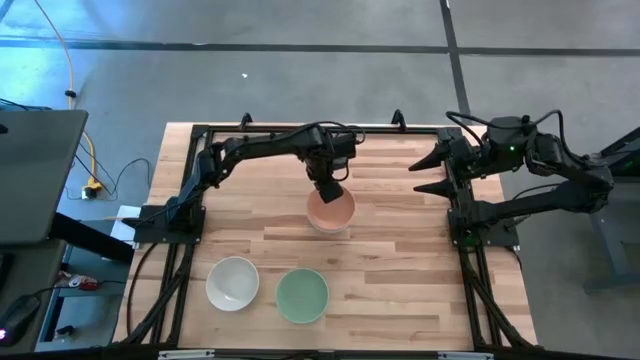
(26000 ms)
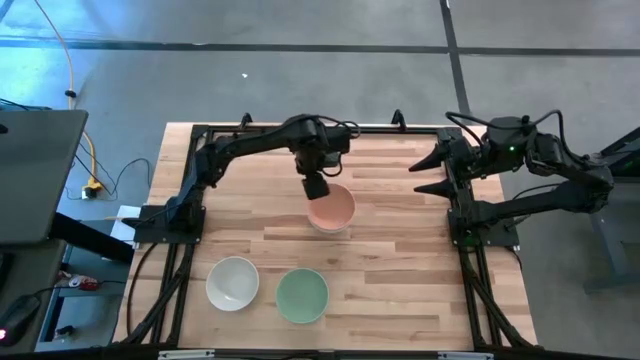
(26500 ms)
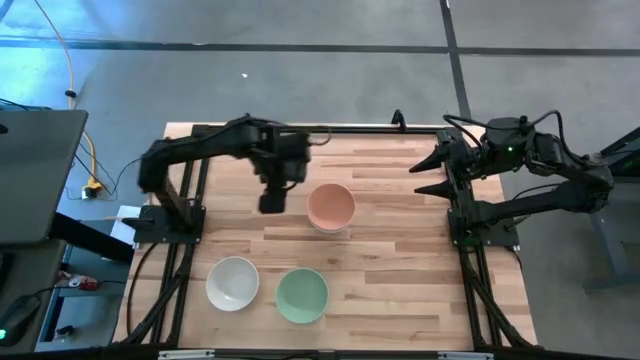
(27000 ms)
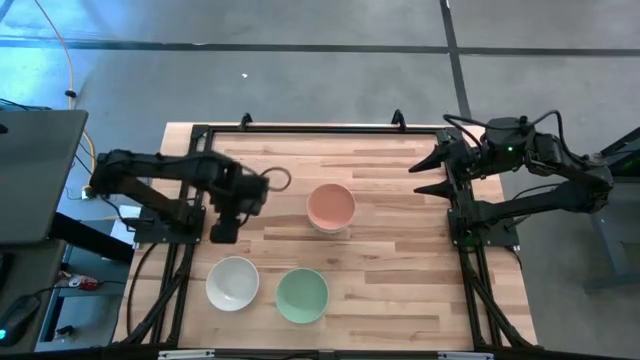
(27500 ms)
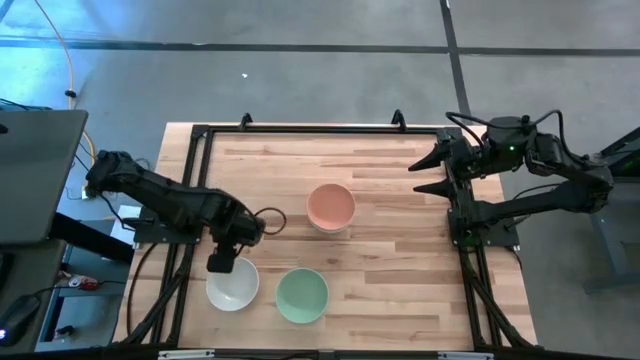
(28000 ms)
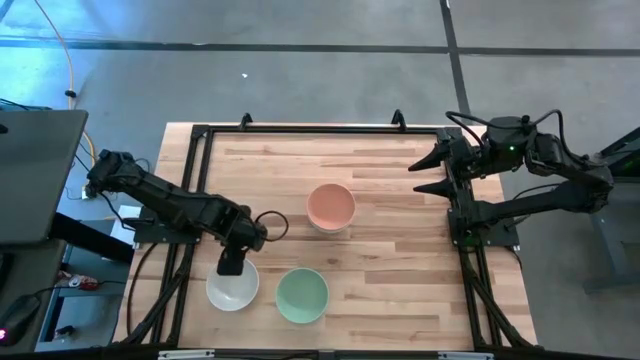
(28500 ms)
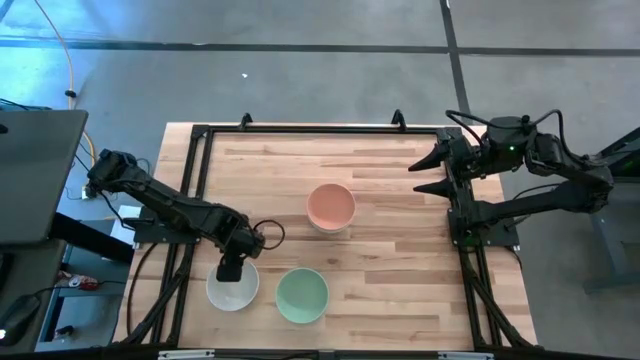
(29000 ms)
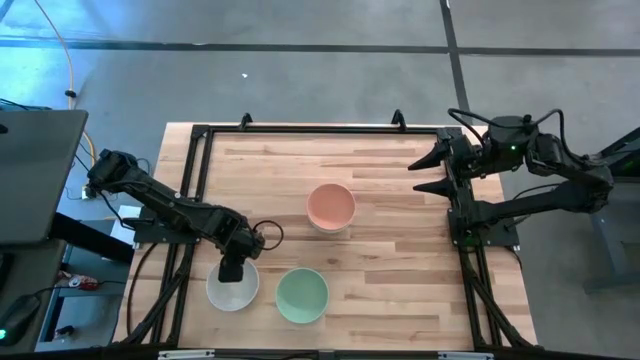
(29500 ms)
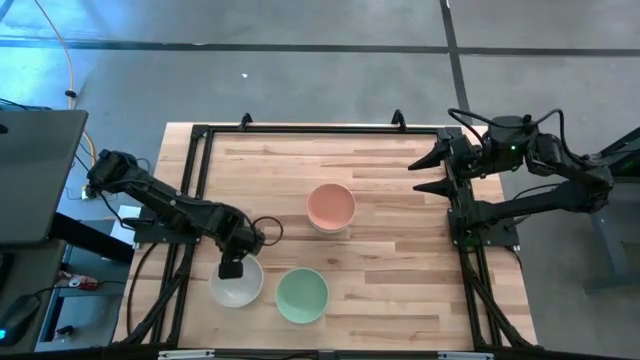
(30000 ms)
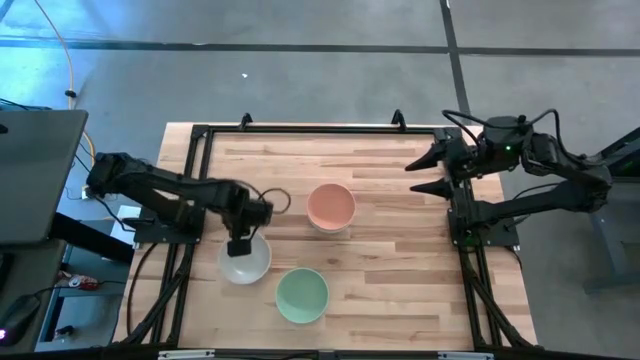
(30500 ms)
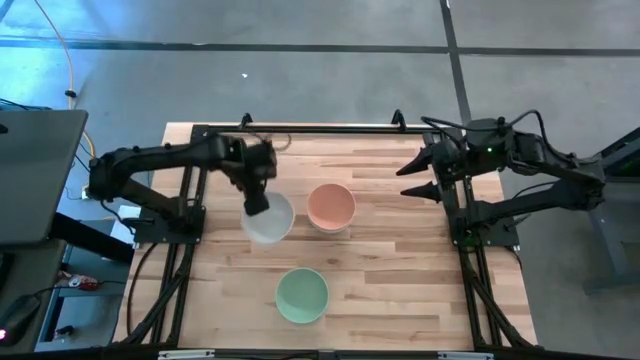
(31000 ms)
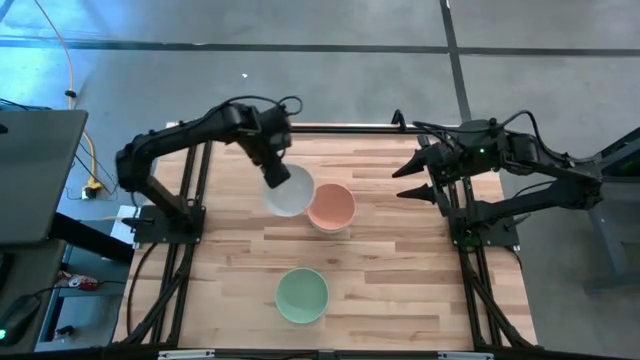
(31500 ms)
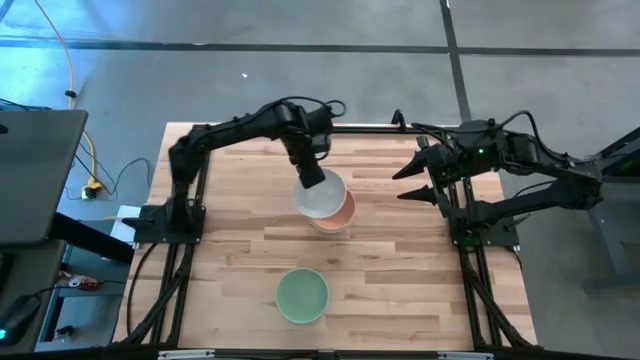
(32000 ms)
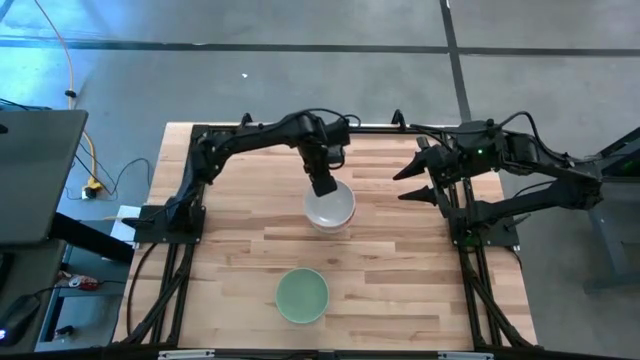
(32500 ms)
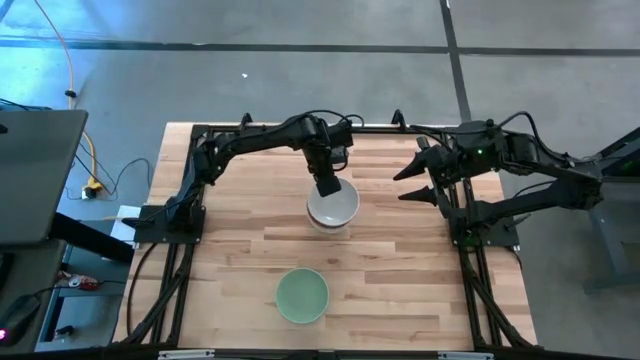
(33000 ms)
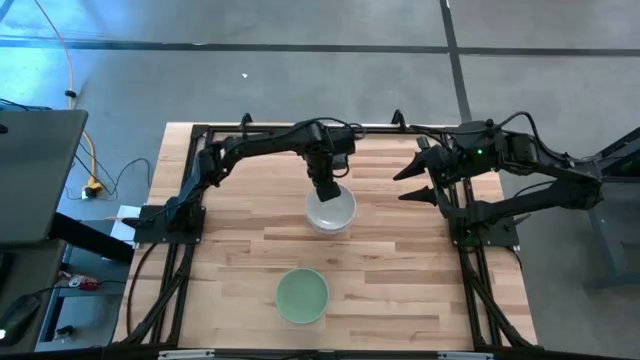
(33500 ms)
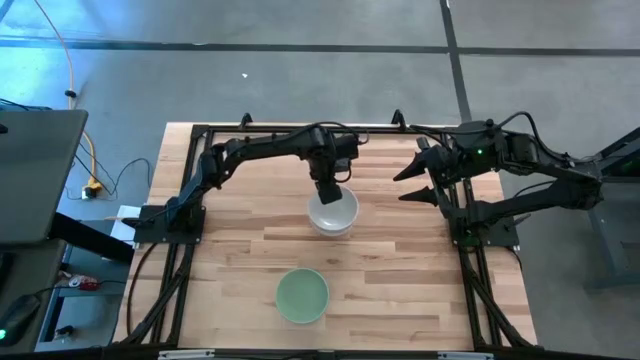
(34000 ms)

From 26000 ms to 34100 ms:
Task: Nest bowls inside each other
Stack the white bowl on top of the orange bowl

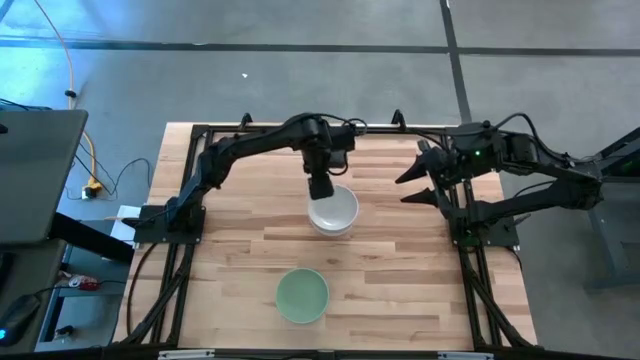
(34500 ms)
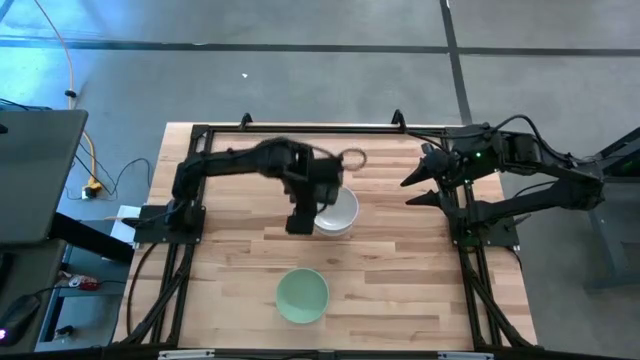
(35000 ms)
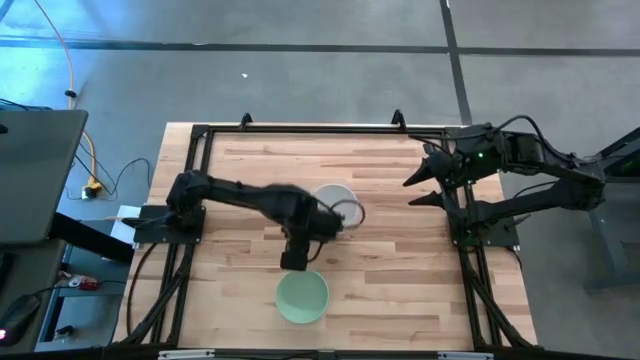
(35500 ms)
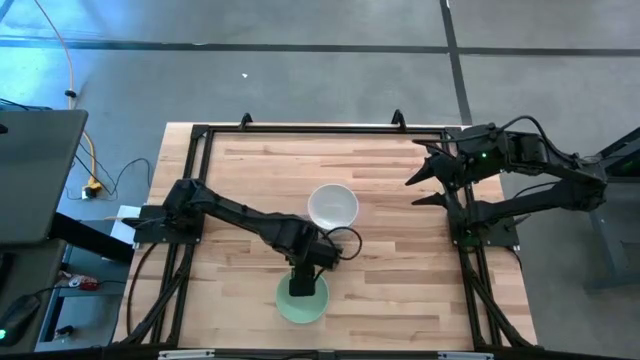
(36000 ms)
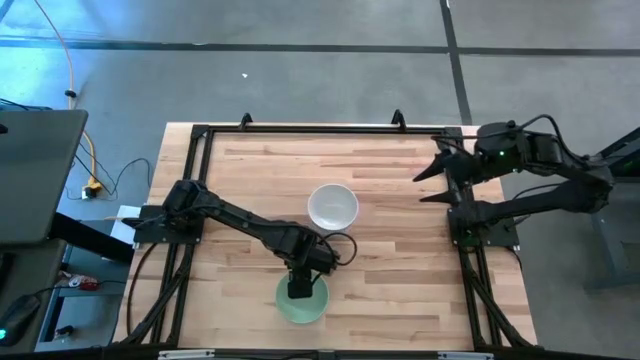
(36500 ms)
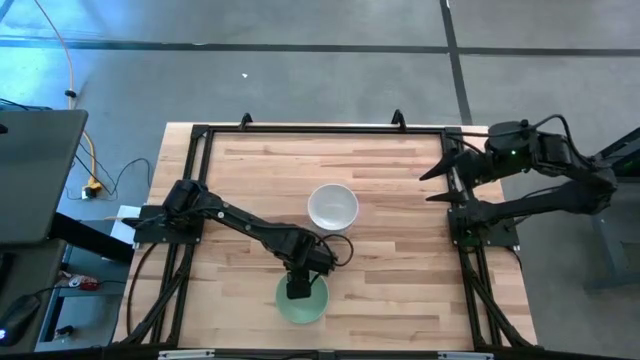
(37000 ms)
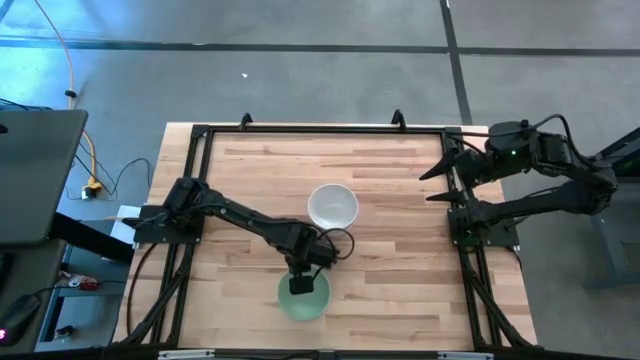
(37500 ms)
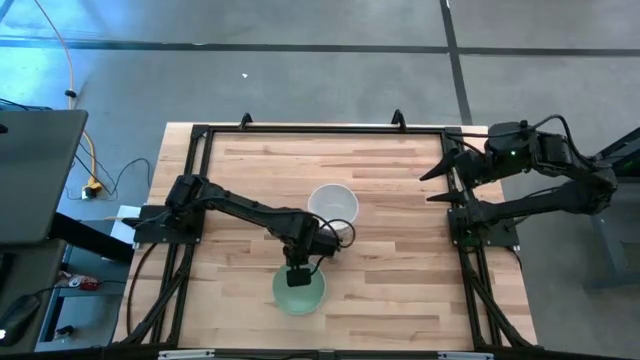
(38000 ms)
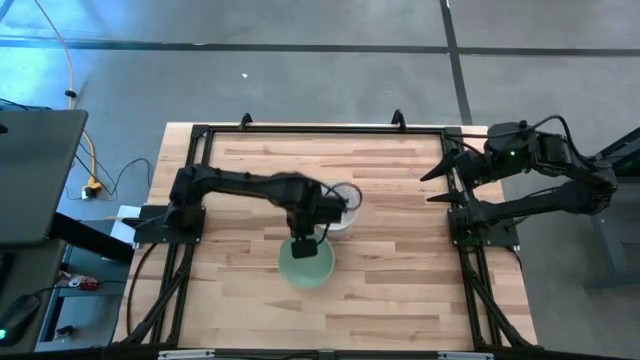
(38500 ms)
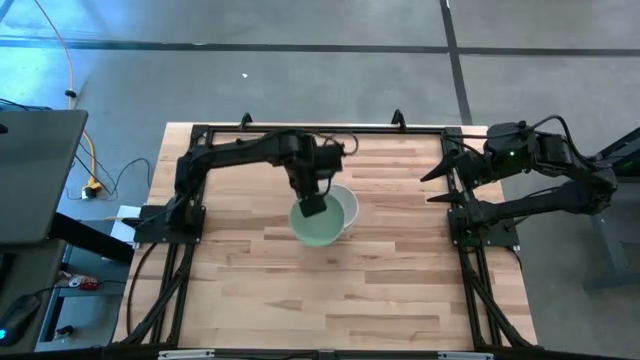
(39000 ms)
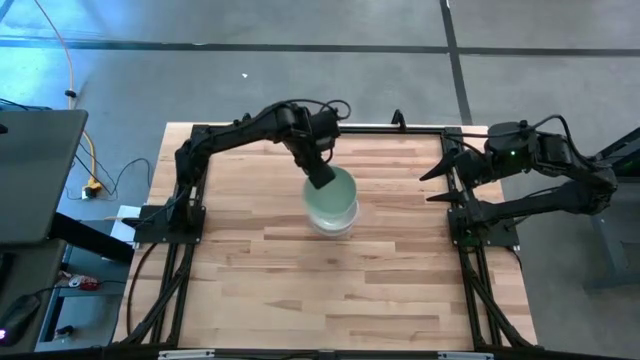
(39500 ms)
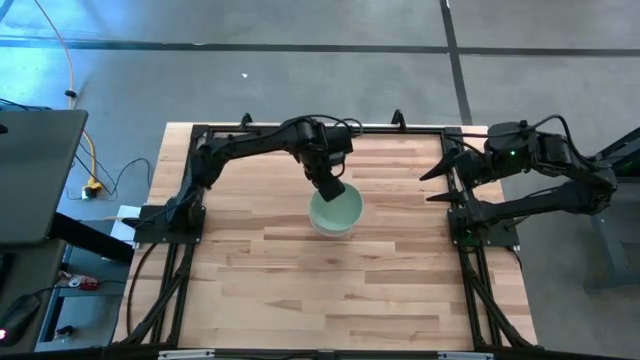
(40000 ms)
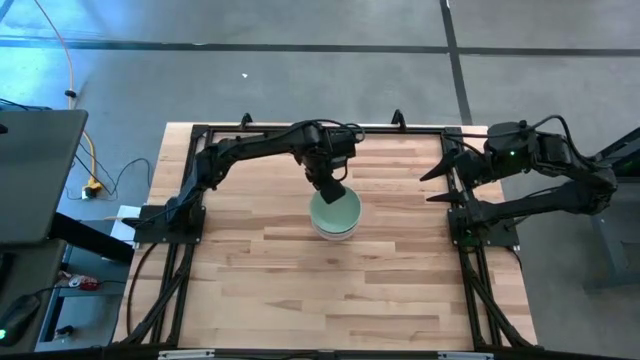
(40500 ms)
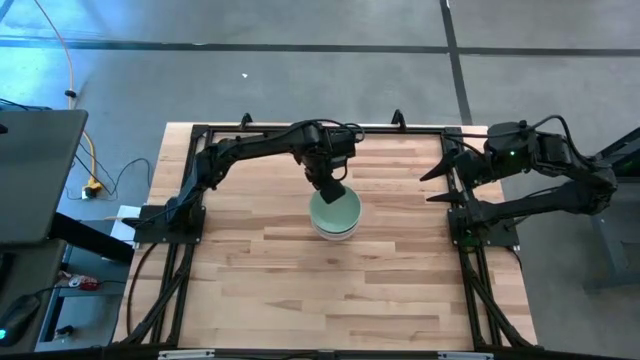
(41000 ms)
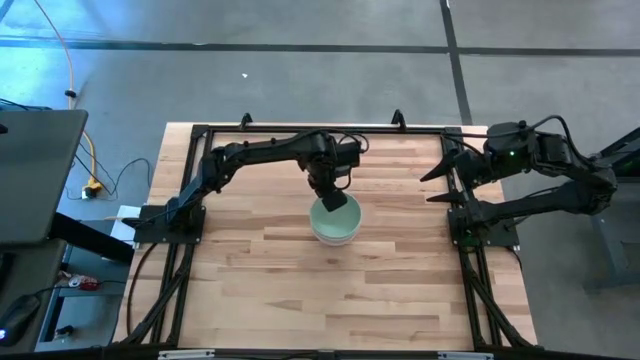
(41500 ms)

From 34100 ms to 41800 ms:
Stack the green bowl on top of the white bowl

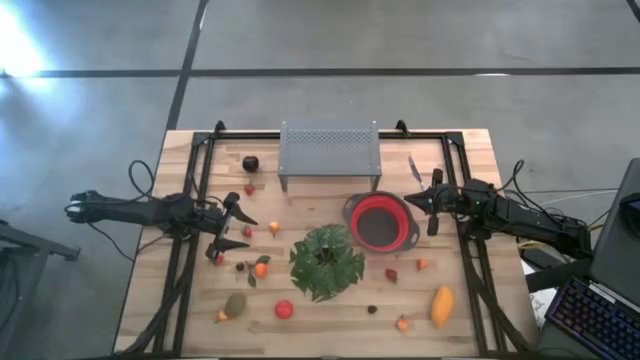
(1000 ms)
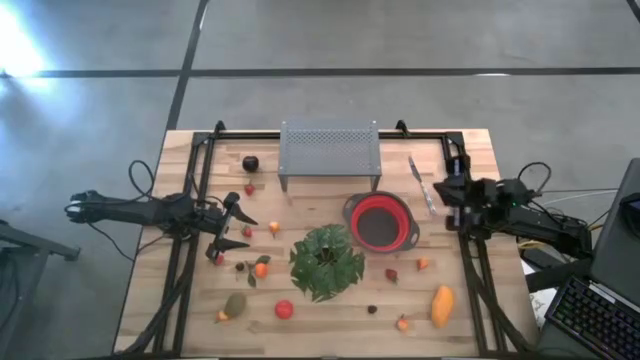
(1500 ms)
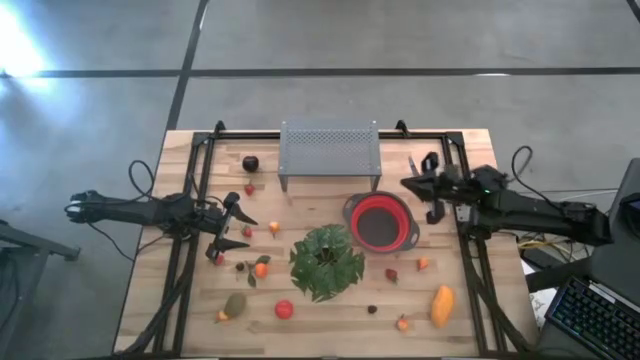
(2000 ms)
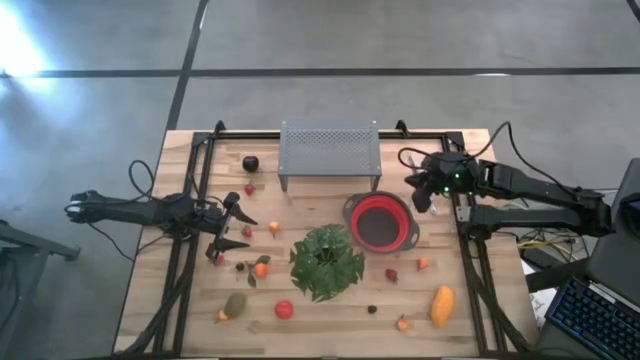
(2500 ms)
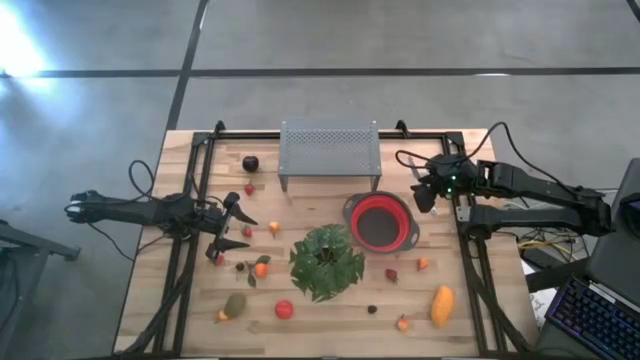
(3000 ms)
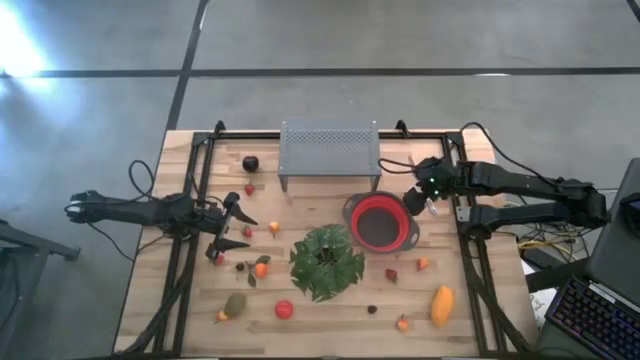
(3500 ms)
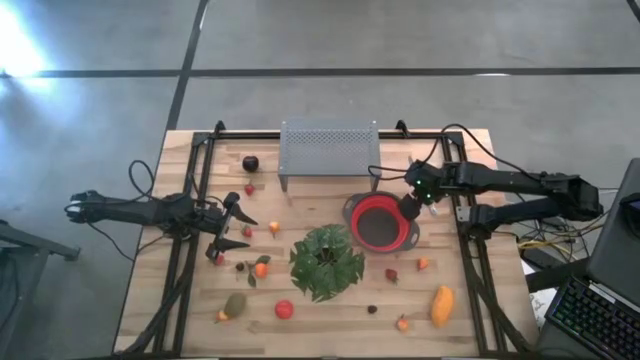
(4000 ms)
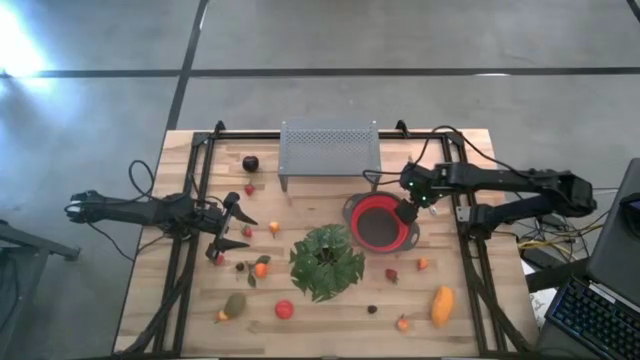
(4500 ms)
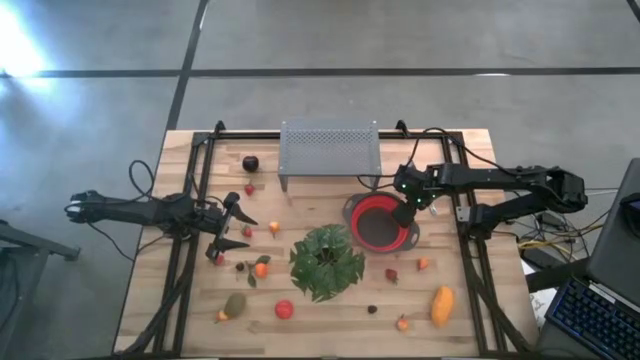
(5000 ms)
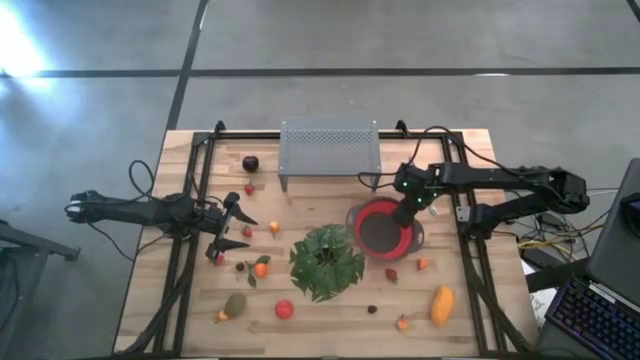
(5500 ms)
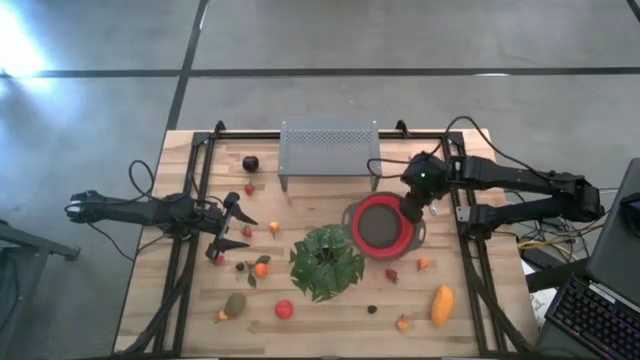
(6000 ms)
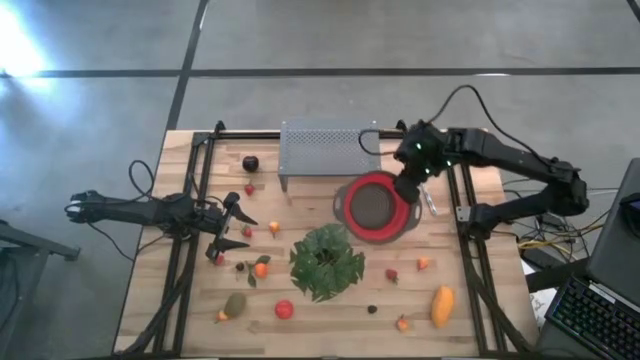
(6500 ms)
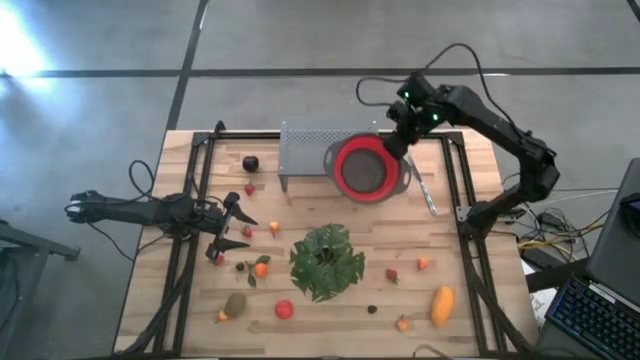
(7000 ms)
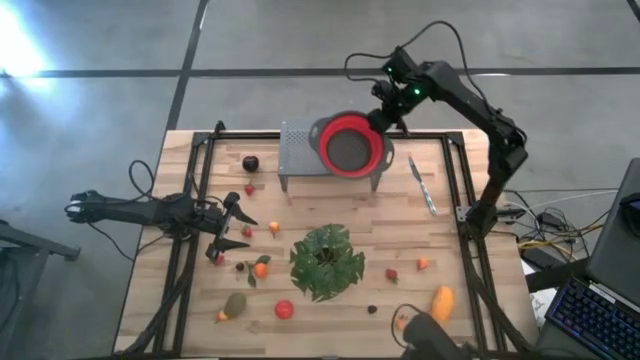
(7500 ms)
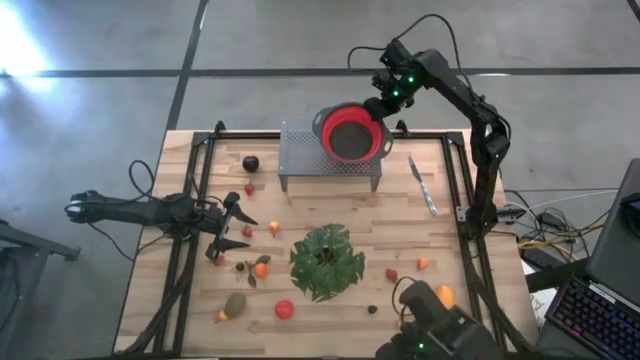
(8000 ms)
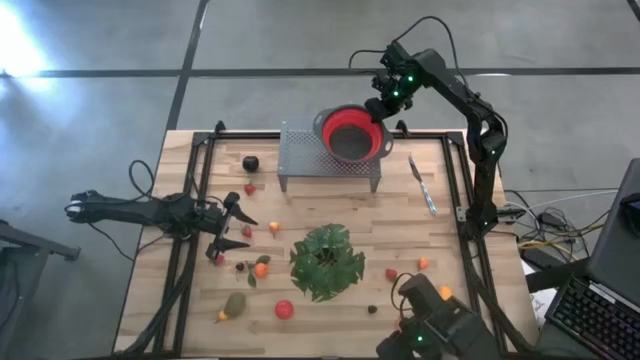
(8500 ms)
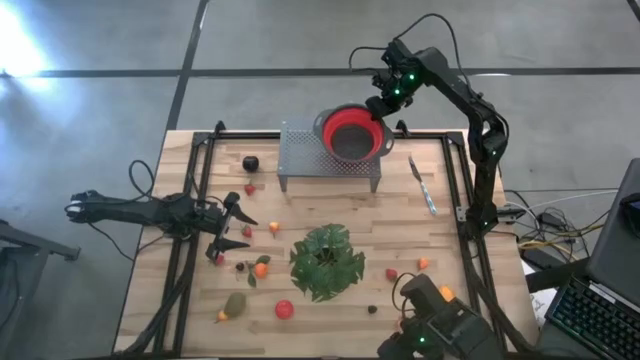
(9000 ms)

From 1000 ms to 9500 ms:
Task: Pick & Place Fruit
Put the red strainer bowl on the shelf
